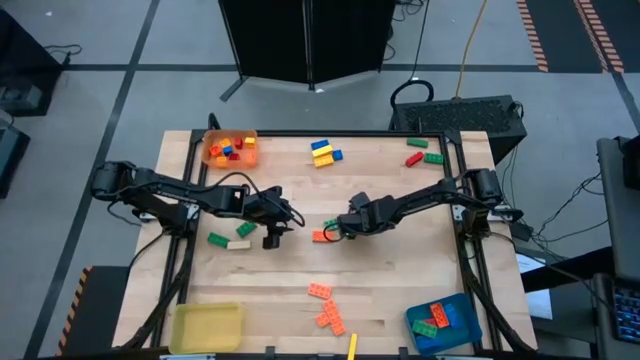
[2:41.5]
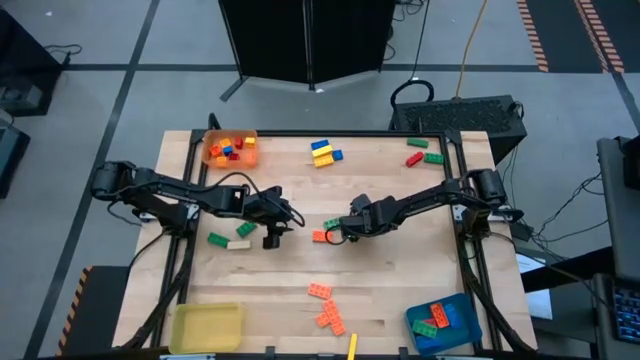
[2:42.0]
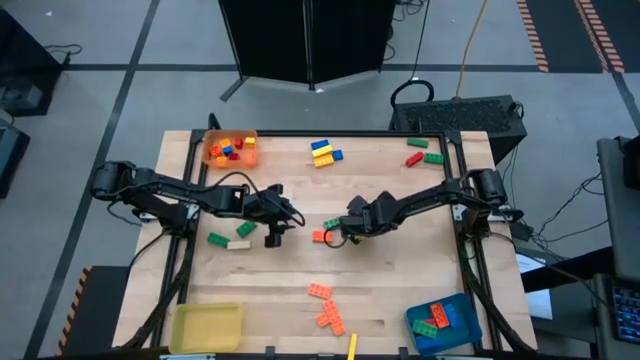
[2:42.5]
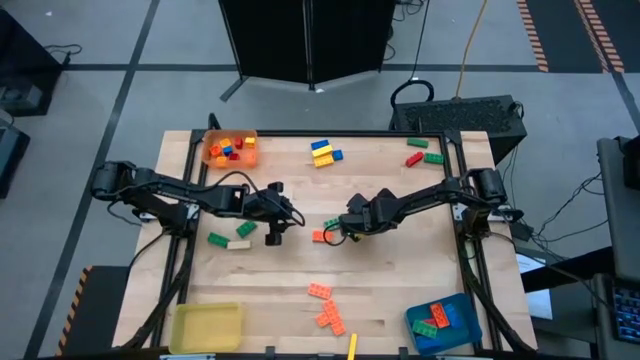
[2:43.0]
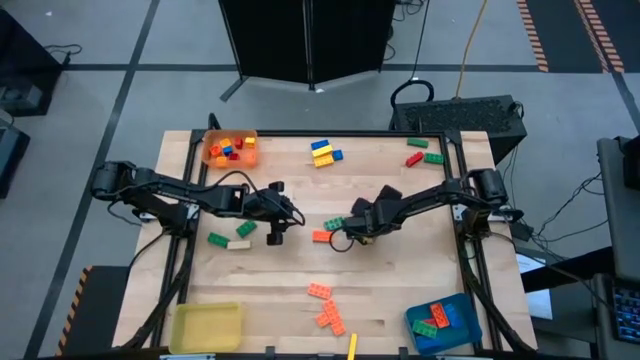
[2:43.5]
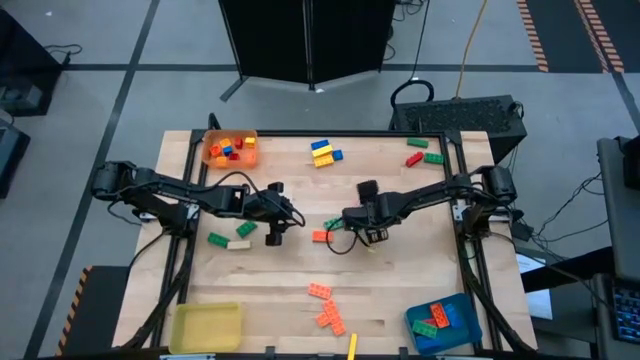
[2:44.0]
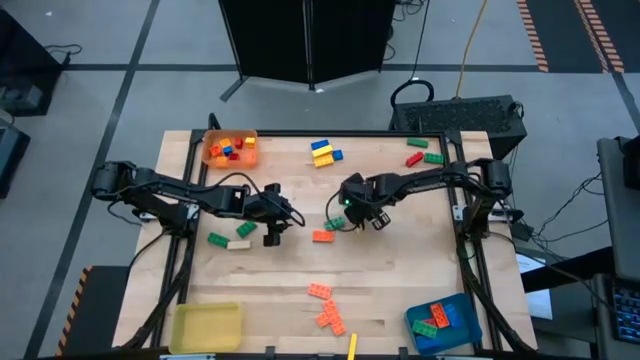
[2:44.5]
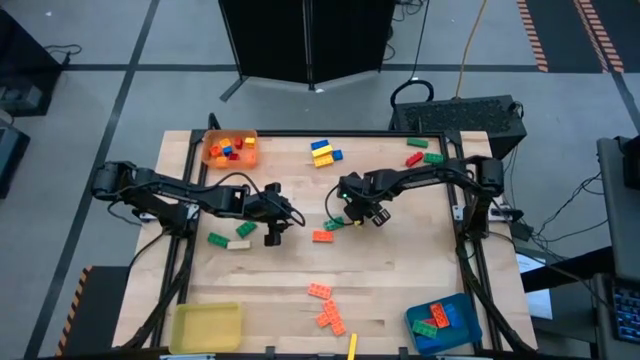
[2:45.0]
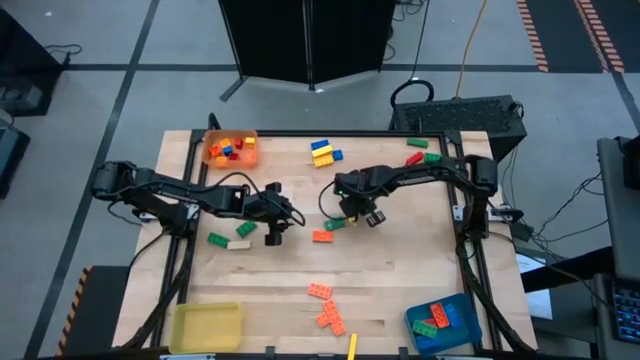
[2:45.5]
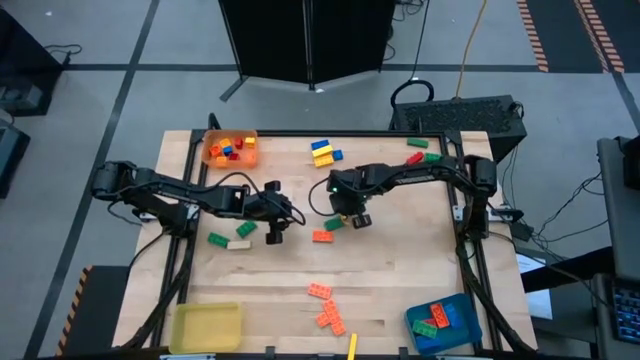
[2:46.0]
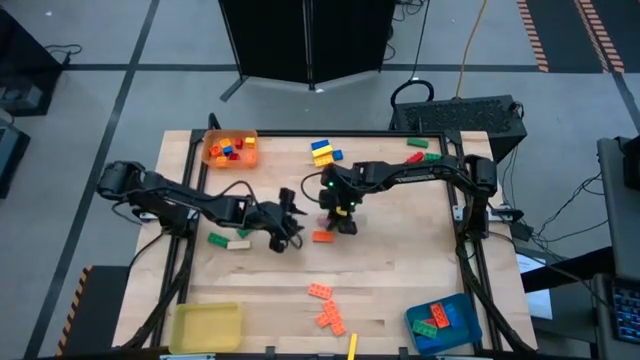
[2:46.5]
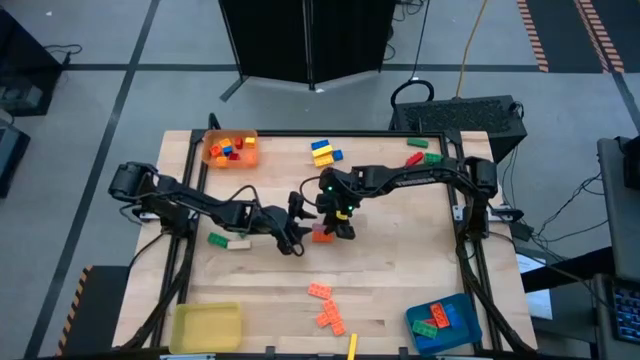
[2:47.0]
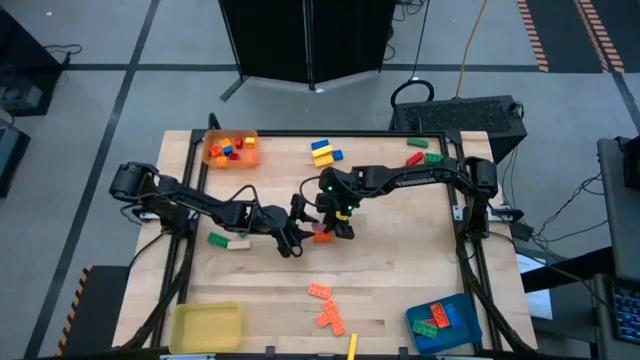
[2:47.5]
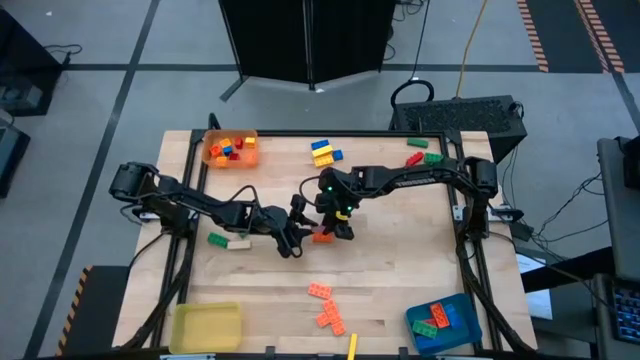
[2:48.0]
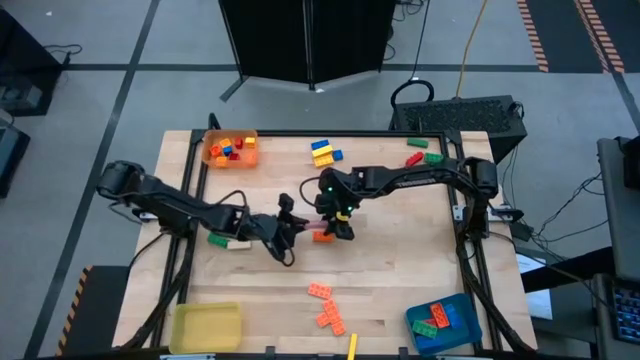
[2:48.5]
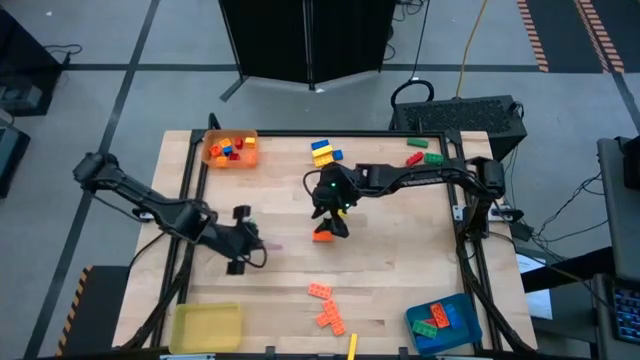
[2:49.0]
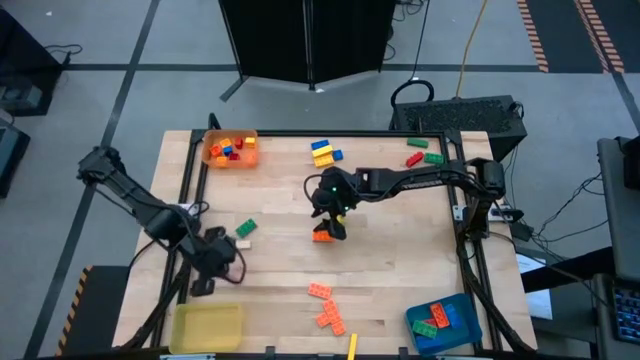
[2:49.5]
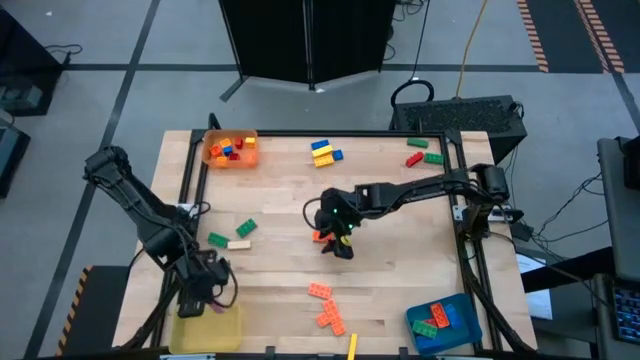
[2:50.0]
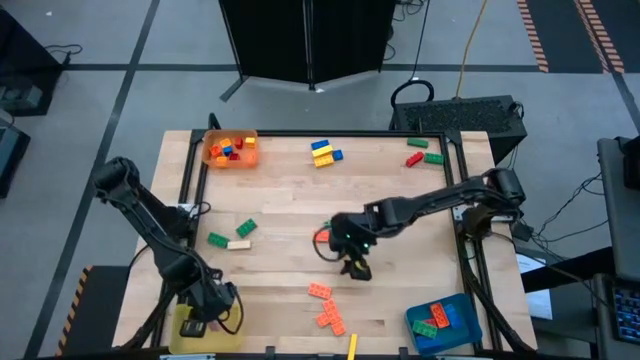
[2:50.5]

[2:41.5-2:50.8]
Task: Sort blocks by size
Put the pink block into the yellow bin

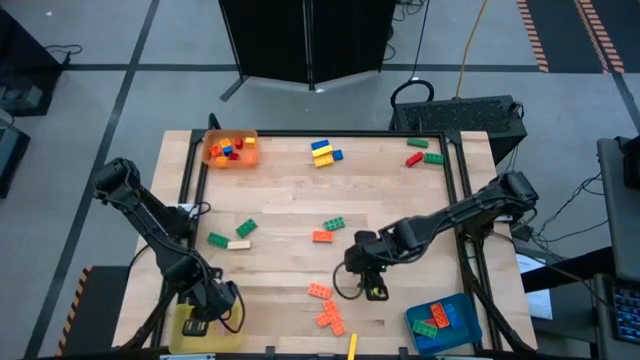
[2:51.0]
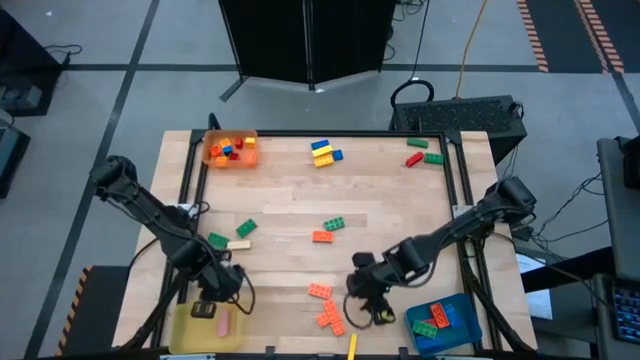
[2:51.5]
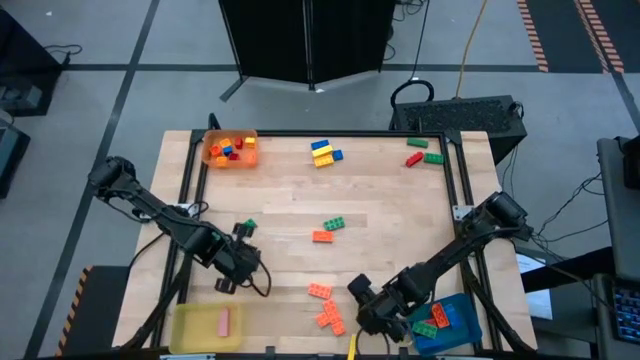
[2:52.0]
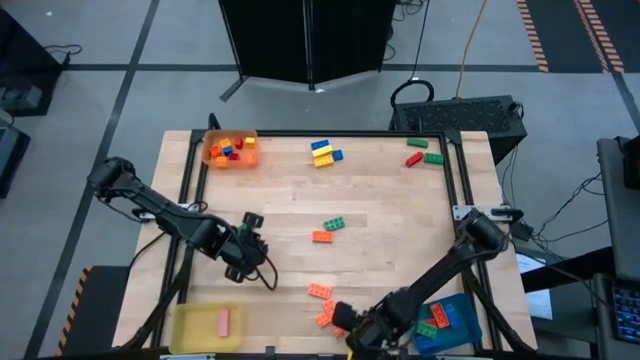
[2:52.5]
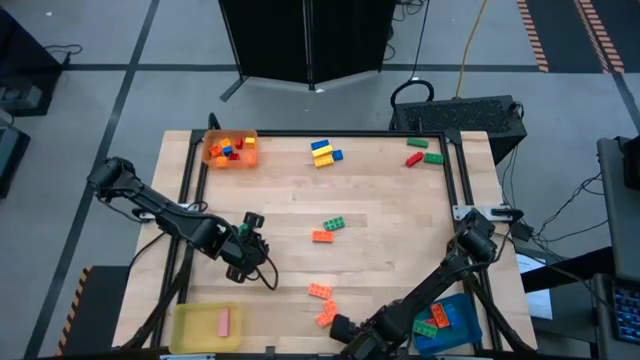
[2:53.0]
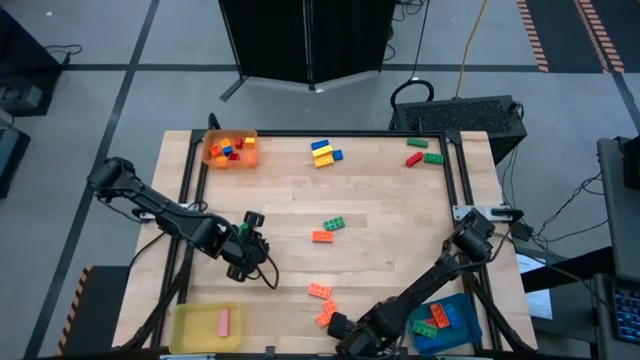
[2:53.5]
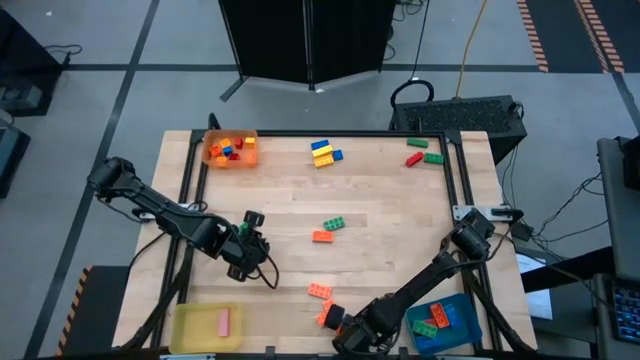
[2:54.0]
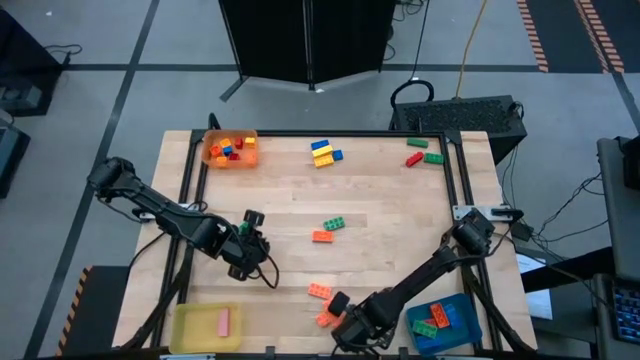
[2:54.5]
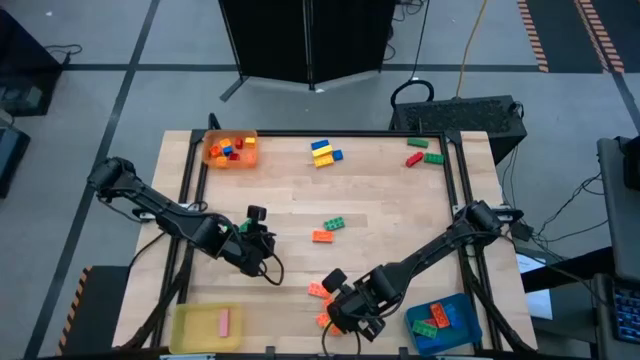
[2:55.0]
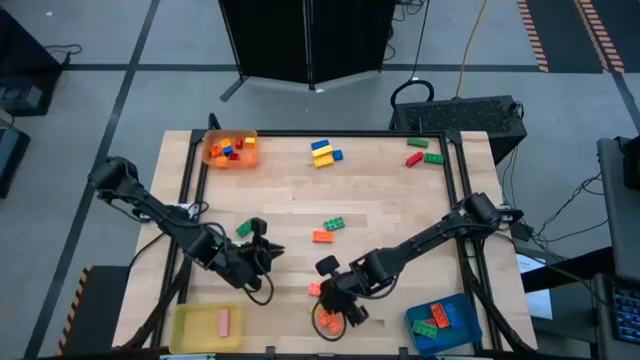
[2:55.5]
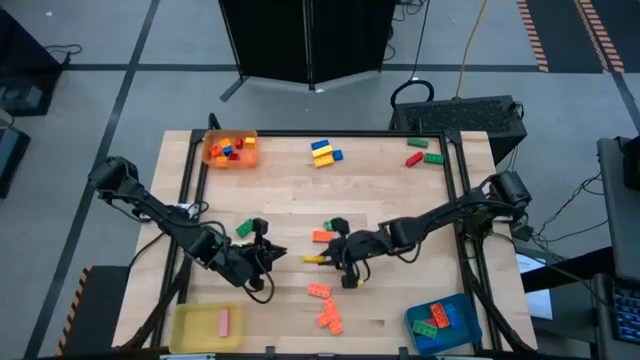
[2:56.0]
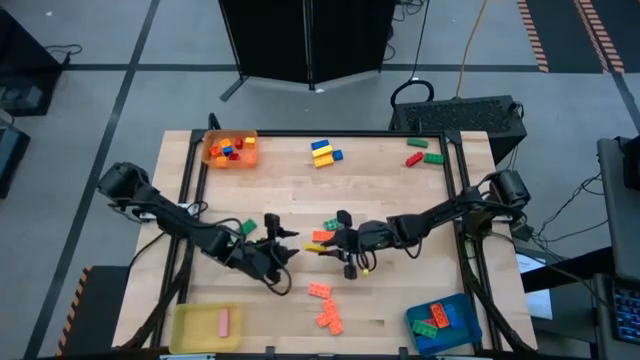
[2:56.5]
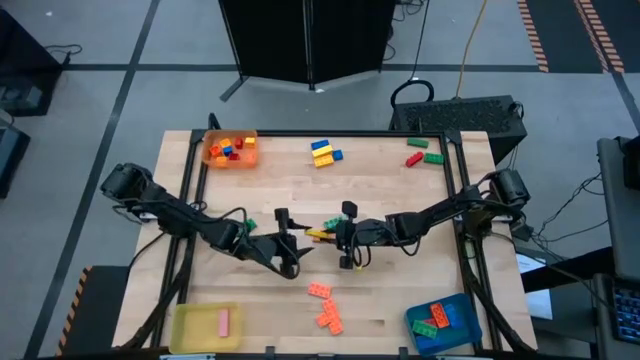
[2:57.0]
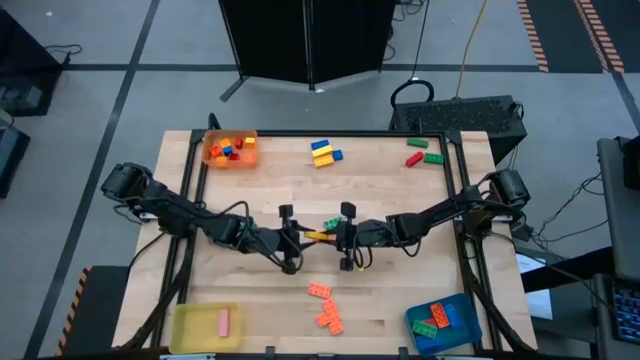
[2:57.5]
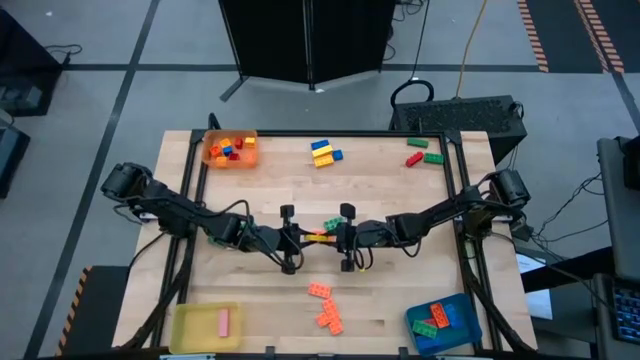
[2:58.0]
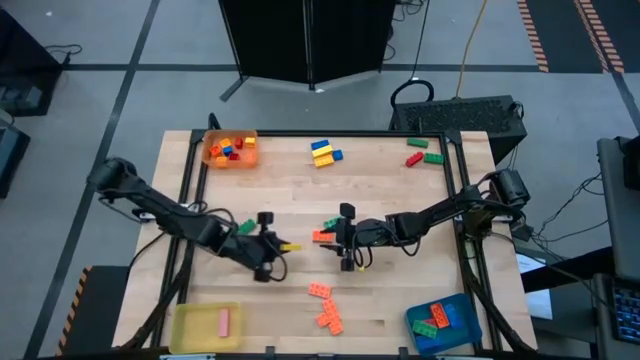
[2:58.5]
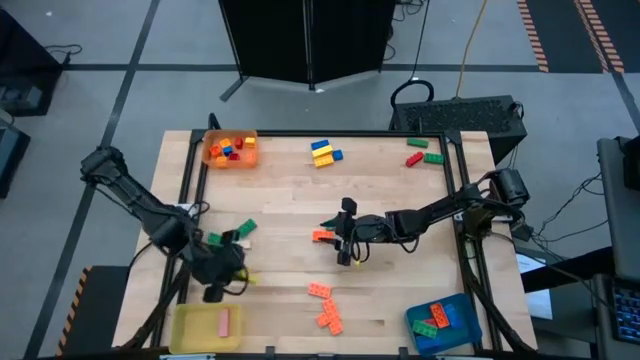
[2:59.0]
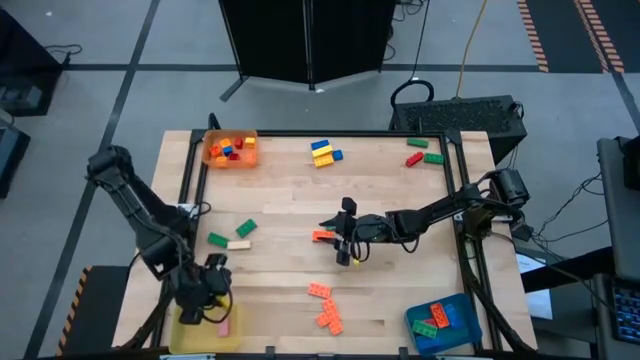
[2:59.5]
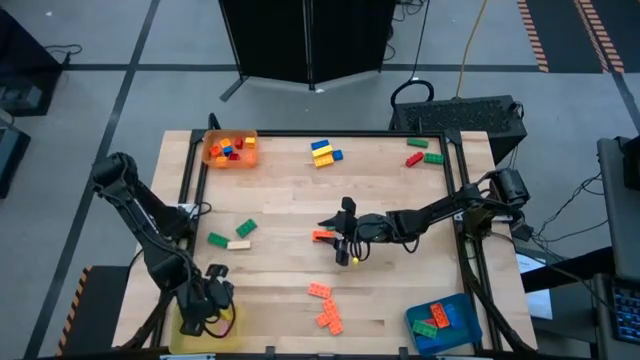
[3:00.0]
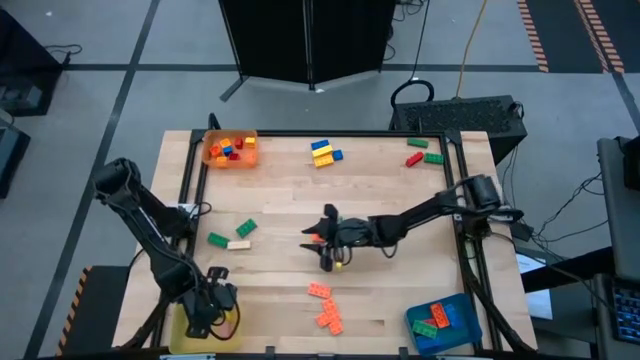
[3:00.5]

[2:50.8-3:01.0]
Put the yellow block into the yellow bin

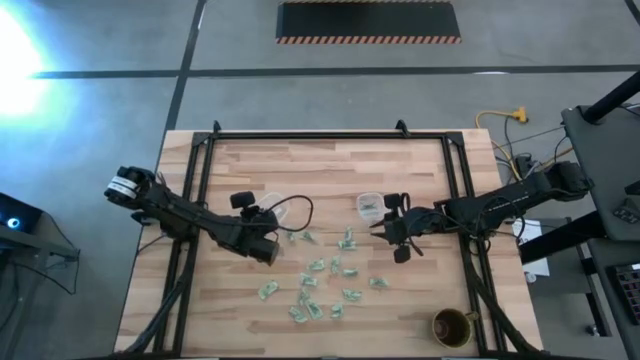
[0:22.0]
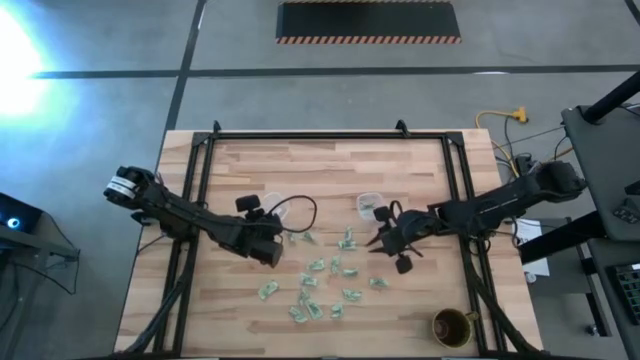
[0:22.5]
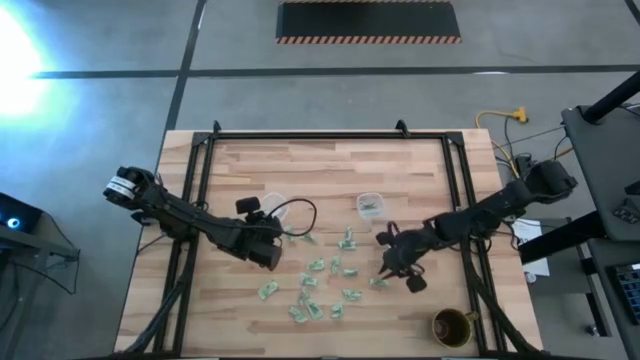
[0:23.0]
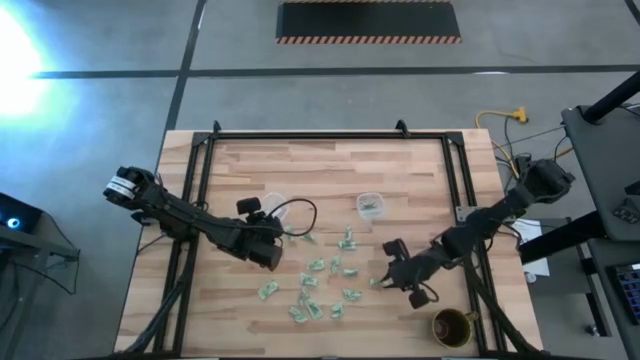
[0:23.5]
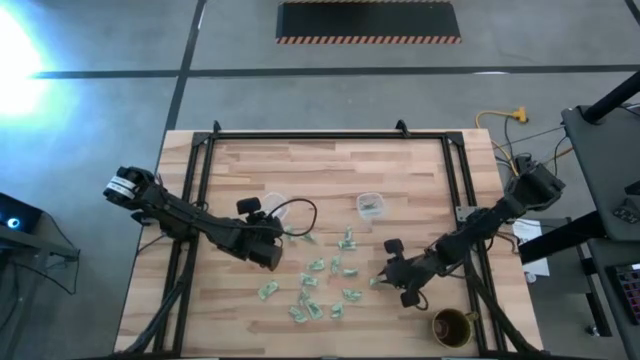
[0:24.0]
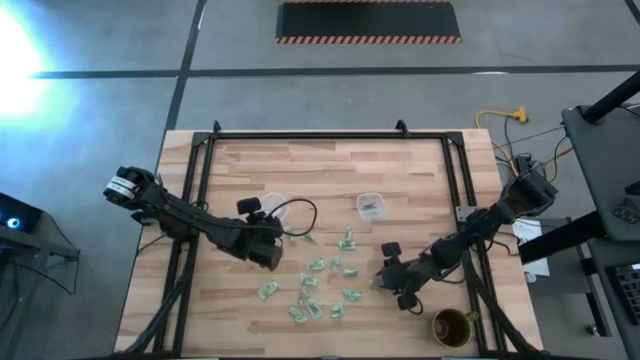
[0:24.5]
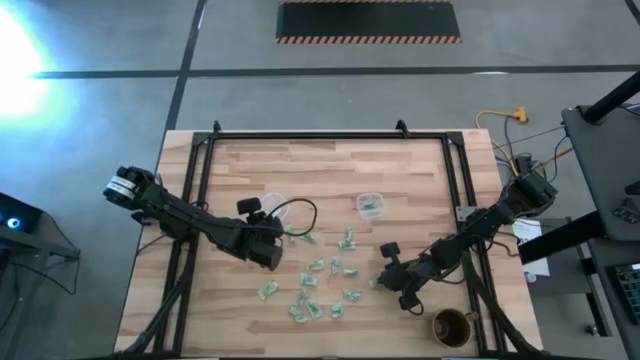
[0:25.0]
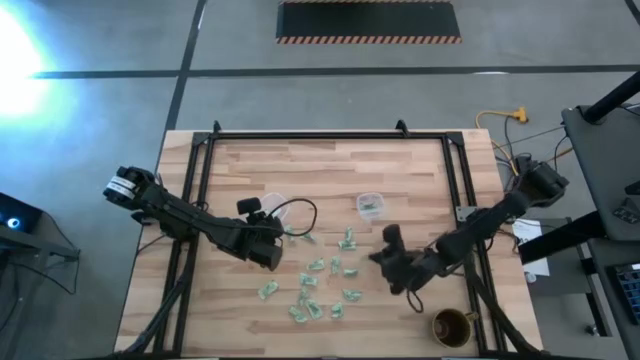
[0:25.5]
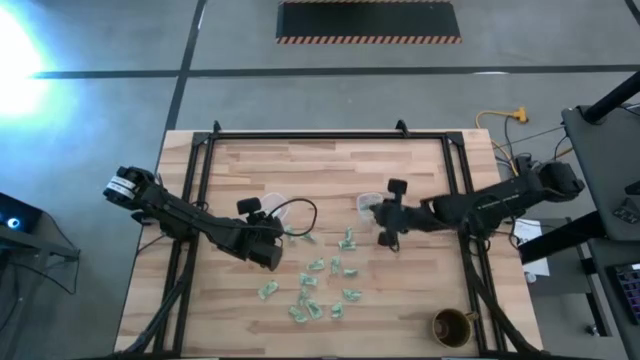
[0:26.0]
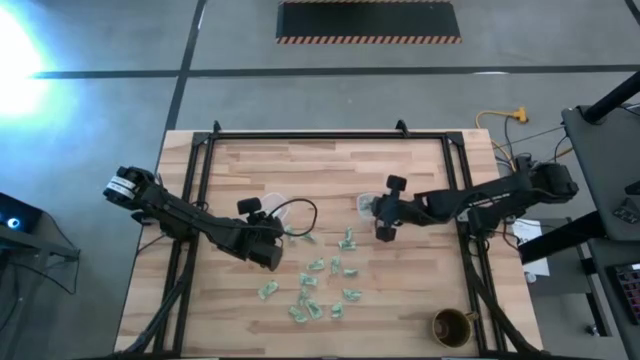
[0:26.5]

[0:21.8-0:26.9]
Task: Pick and place Stevia / Truvia into bins
Put the light green stevia packet into the right transparent container
